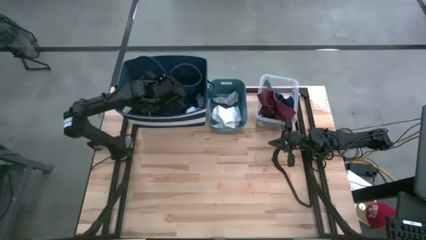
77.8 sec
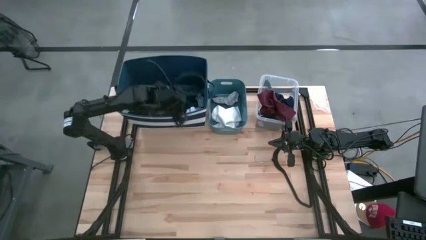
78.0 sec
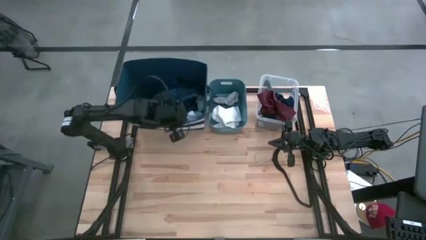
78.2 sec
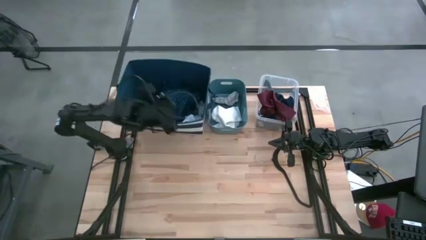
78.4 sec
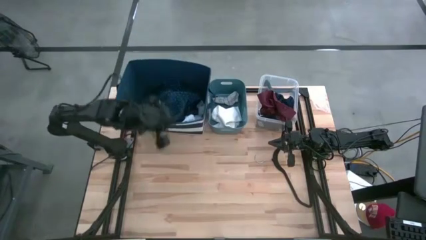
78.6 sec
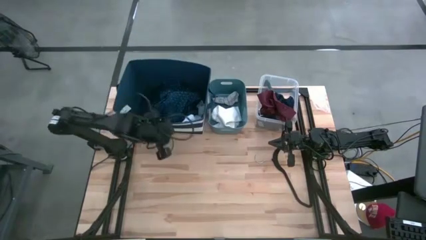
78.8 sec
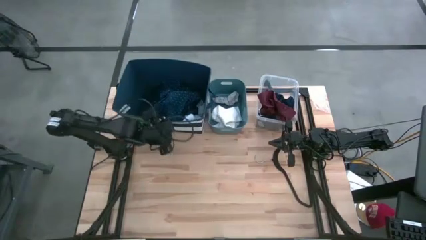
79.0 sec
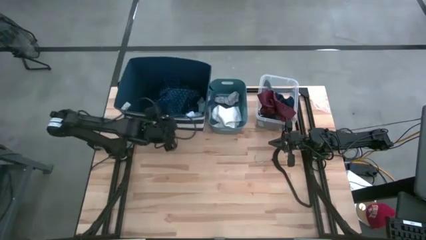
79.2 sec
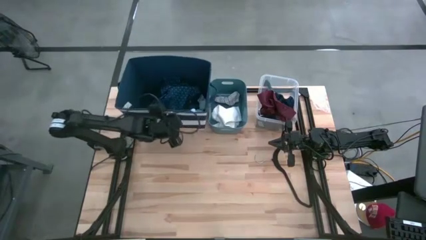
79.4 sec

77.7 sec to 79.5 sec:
Task: Pick & Place Cloths
Adjust the blue bin

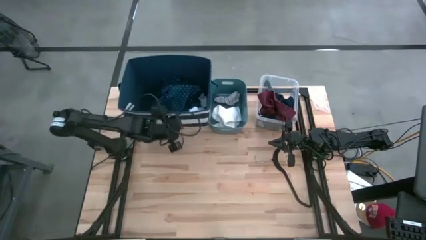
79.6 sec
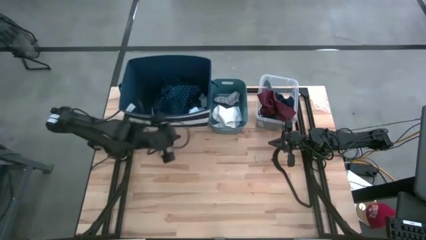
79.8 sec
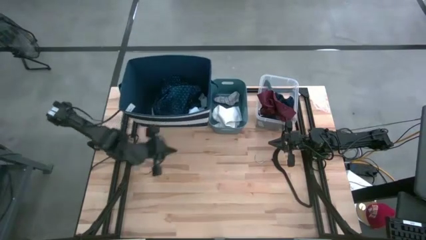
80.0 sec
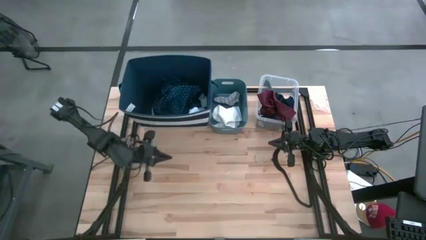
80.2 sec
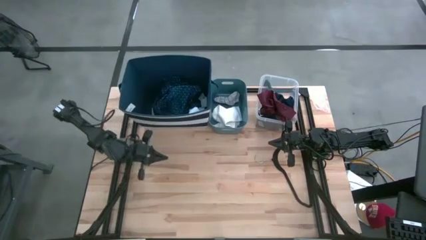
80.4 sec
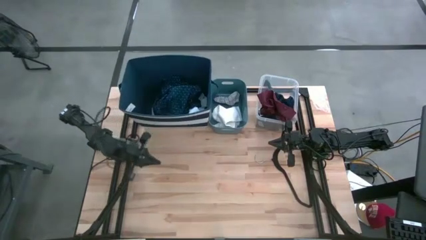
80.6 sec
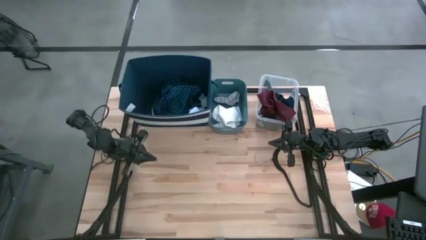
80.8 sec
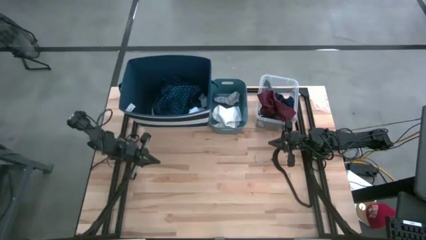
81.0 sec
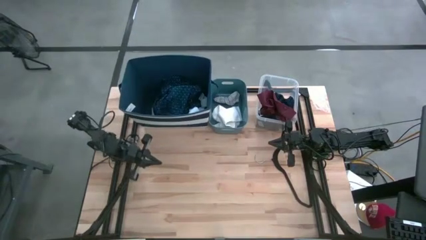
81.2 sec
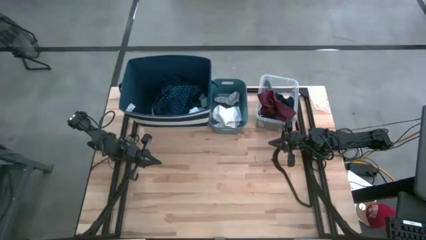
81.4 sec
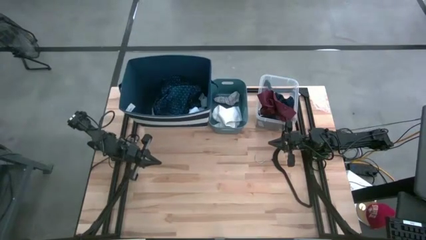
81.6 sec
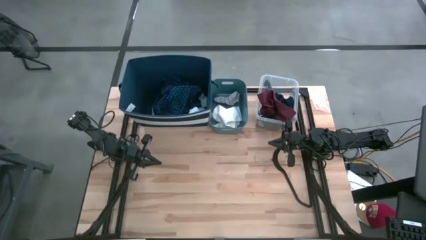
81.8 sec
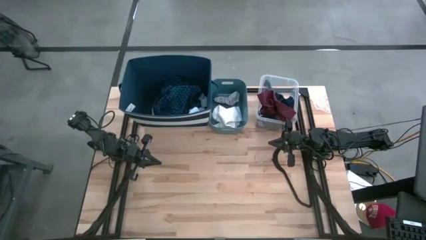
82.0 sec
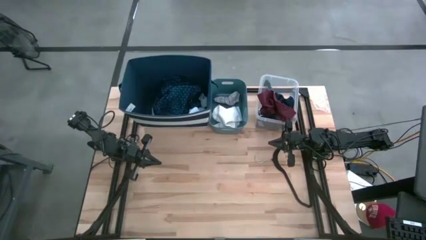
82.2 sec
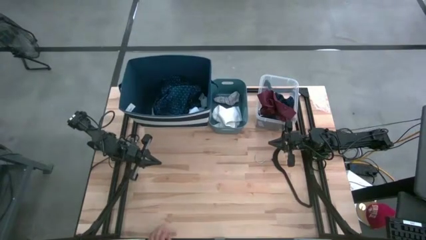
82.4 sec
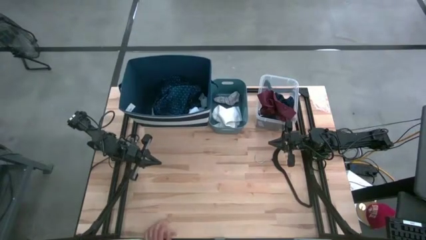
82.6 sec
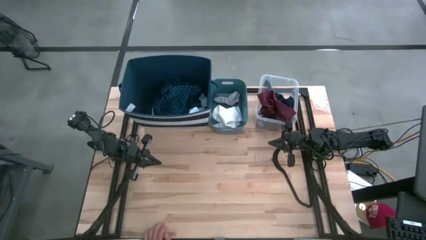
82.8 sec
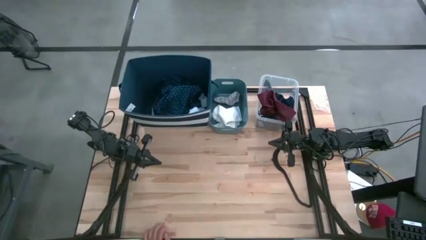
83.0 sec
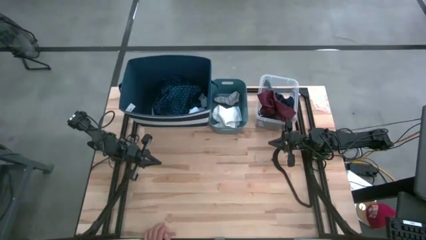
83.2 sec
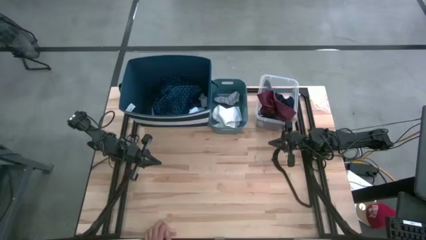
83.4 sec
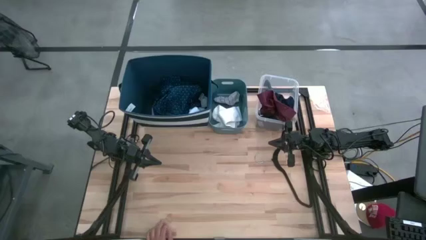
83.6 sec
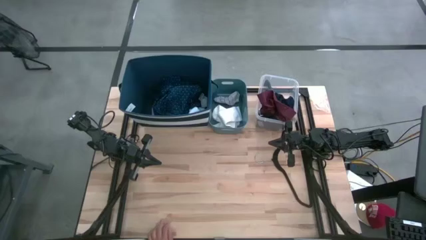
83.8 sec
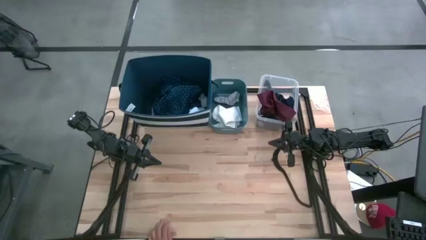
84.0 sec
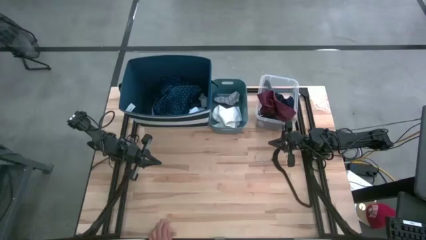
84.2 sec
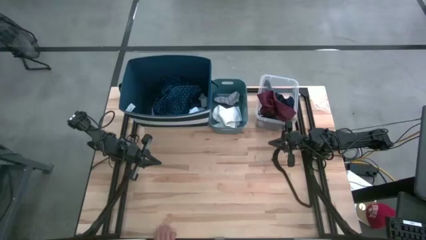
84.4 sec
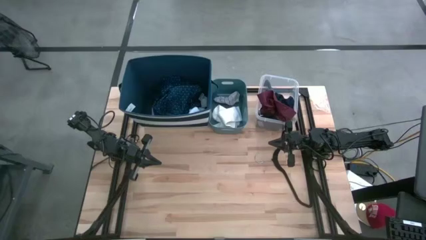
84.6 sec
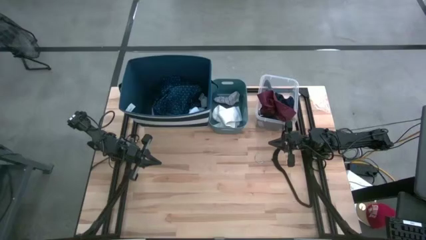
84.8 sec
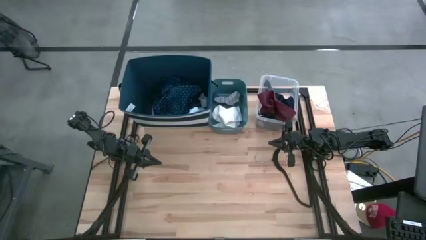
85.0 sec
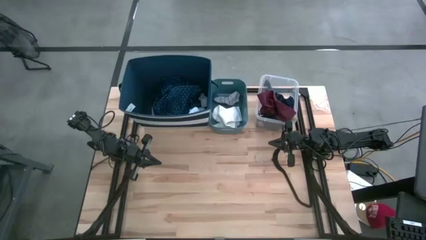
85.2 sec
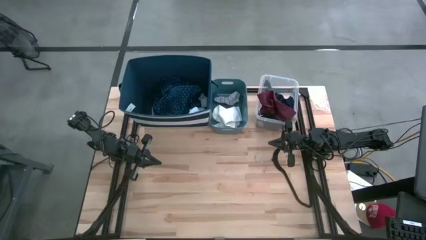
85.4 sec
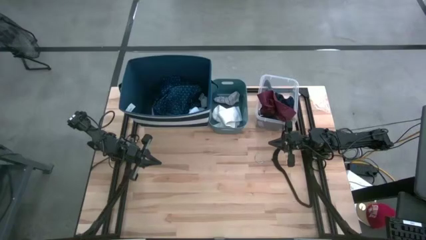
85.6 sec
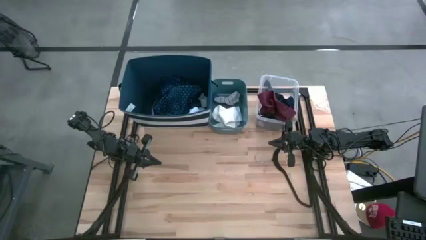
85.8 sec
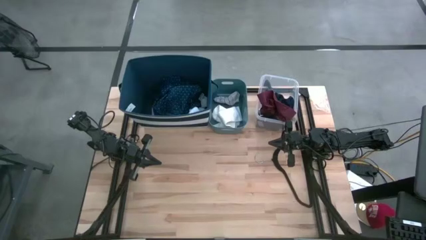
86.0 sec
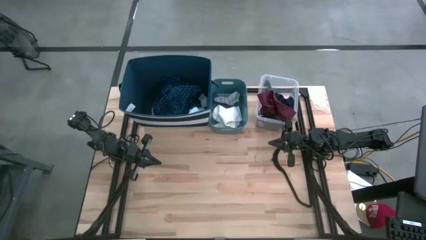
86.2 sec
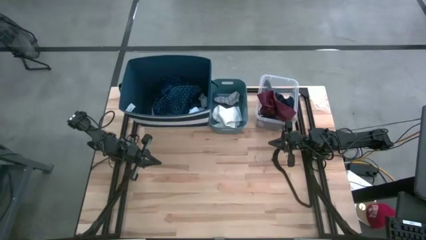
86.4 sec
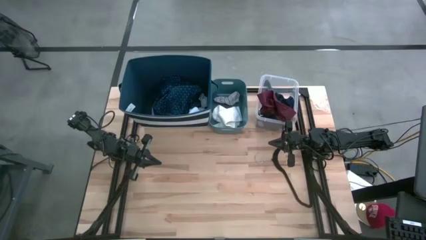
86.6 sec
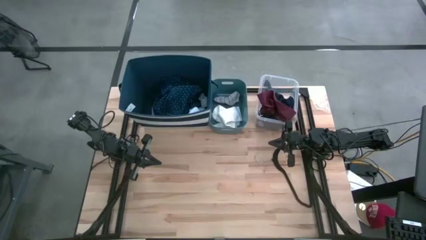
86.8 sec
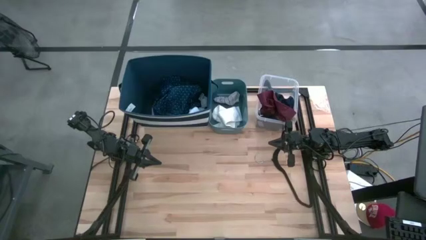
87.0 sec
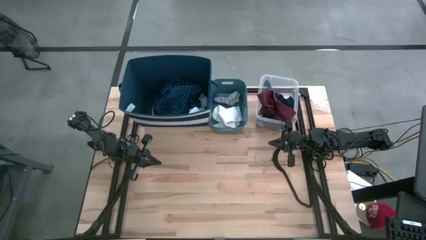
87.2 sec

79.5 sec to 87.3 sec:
Return to Home Position

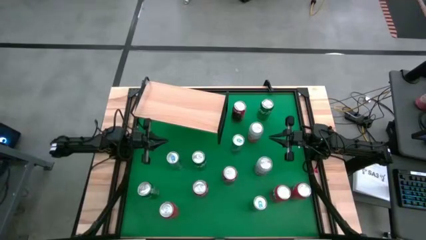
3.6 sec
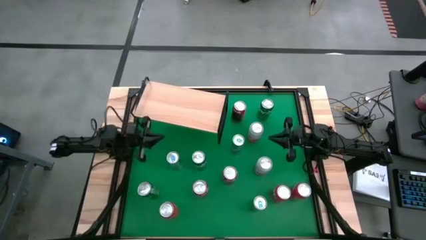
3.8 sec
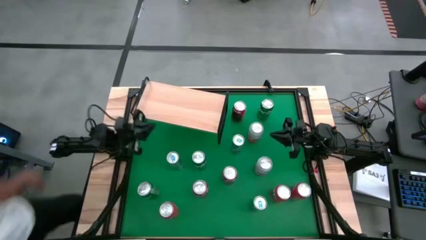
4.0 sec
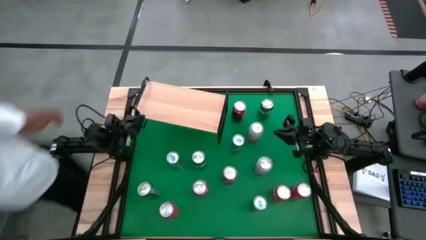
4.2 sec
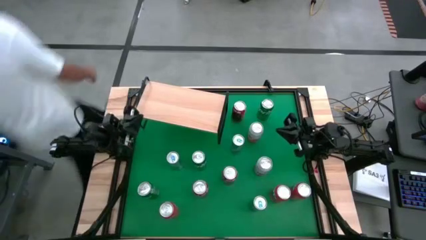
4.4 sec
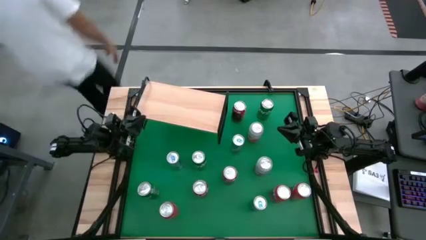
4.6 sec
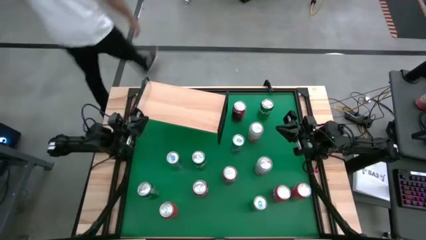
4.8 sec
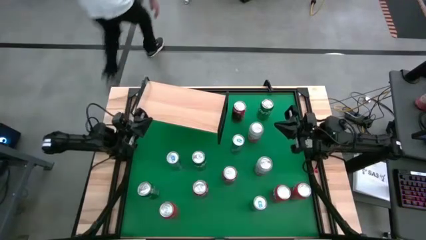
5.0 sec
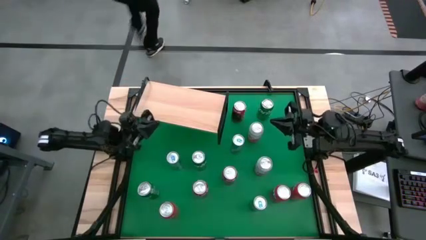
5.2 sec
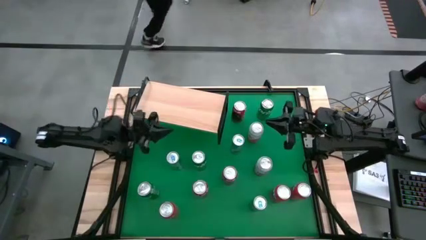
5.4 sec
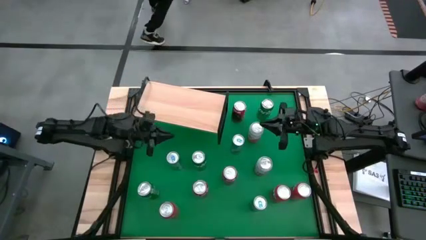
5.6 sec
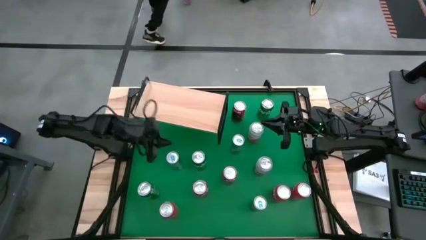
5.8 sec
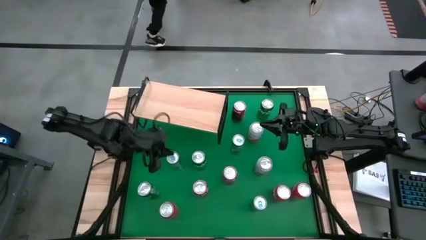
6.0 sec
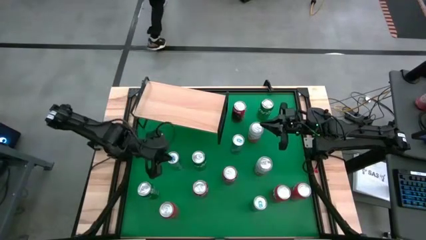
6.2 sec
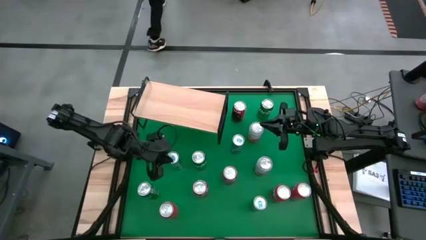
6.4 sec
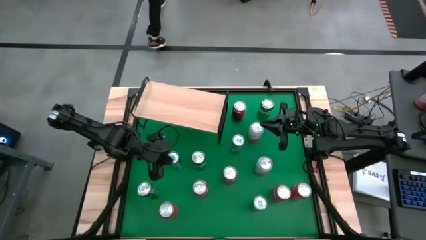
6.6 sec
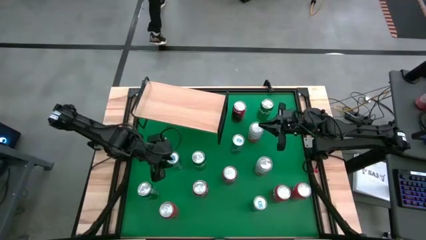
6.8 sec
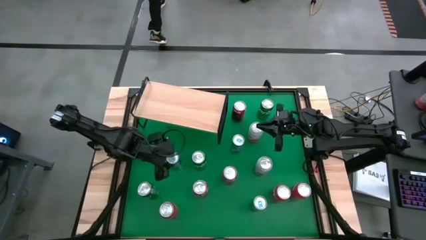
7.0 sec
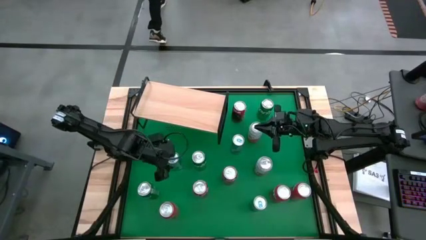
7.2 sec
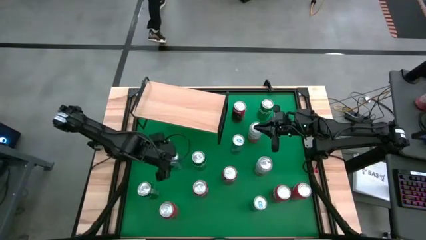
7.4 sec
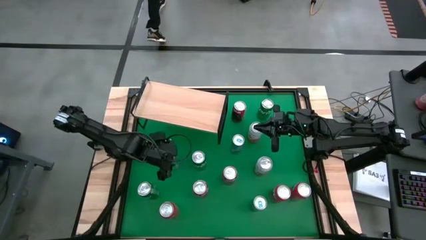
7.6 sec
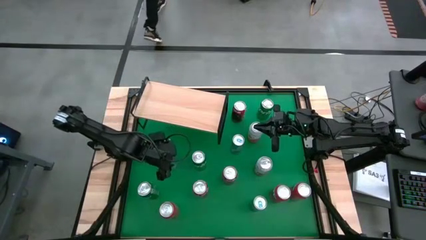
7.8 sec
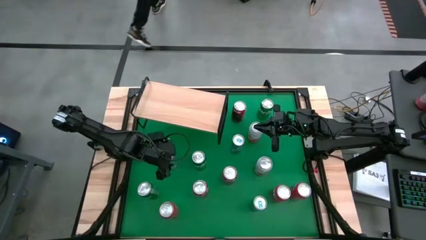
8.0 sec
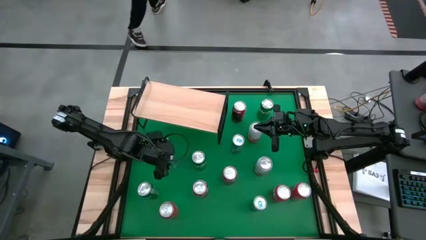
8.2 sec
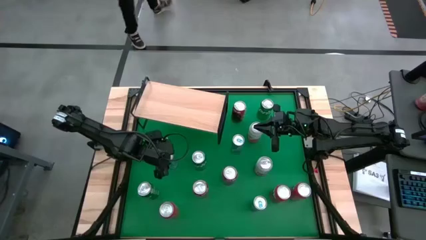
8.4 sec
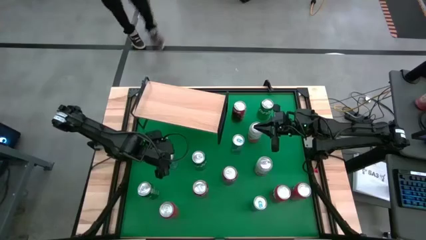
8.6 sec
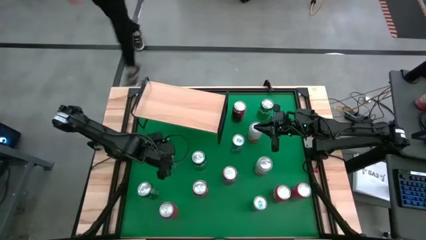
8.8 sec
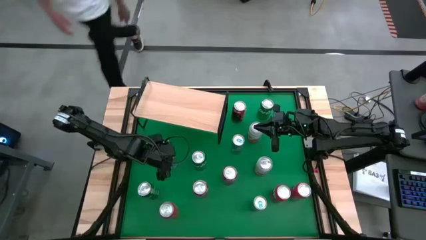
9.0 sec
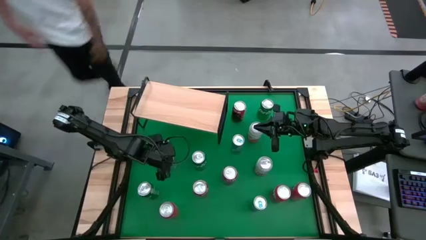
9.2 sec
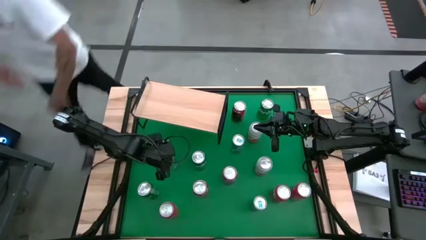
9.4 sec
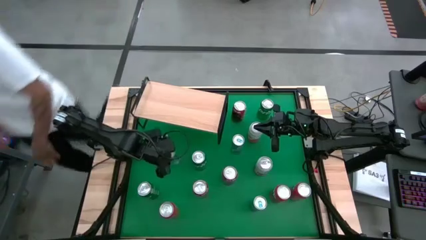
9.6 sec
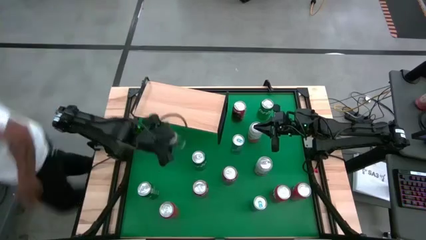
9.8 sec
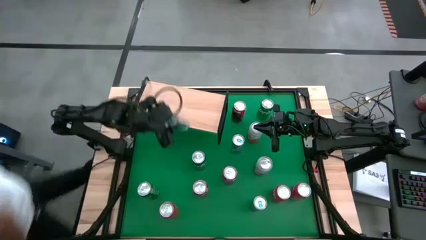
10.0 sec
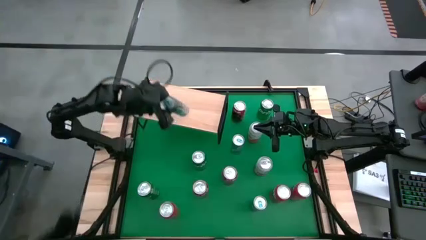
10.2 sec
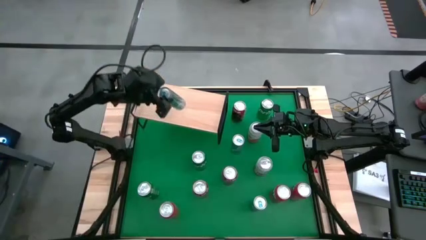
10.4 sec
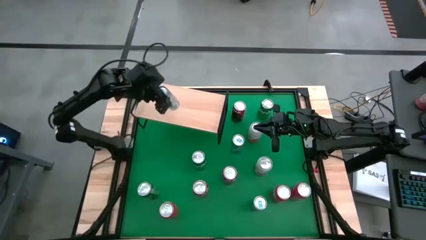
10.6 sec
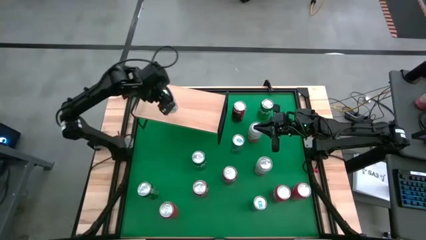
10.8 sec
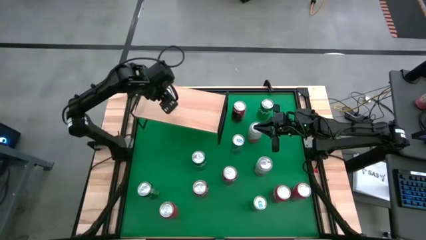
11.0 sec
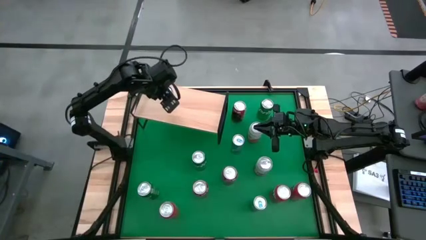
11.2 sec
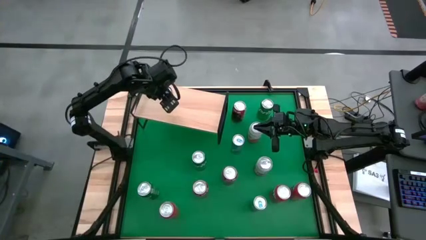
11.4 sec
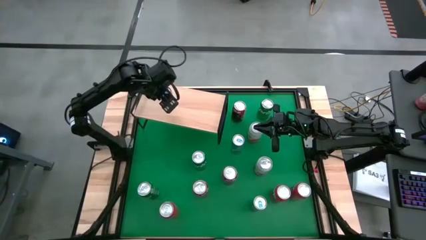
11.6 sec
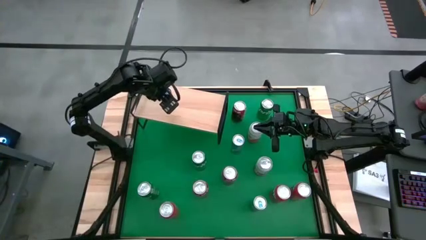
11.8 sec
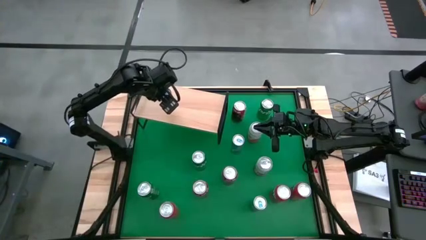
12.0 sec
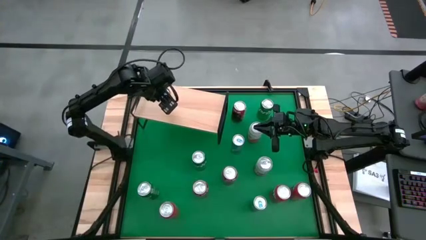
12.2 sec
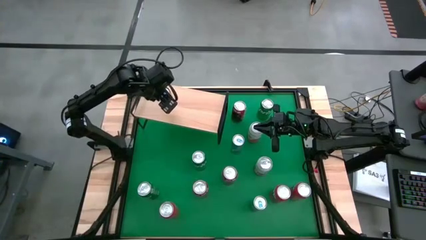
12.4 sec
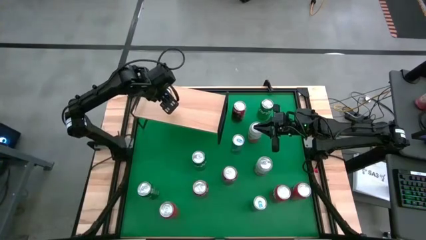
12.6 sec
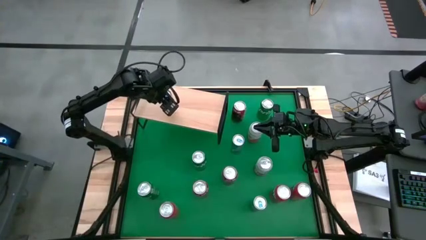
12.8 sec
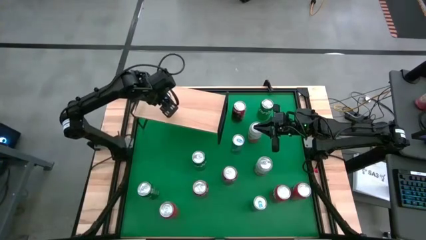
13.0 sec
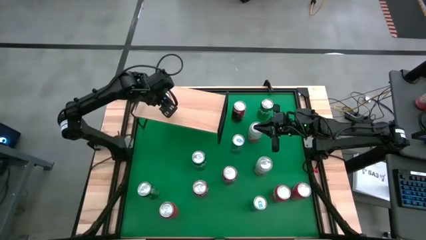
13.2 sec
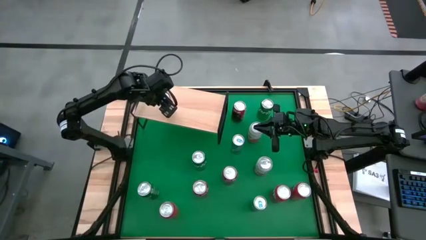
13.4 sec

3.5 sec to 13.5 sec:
Task: Place canned beverage on shelf
Put the blue/white soda can on the shelf
